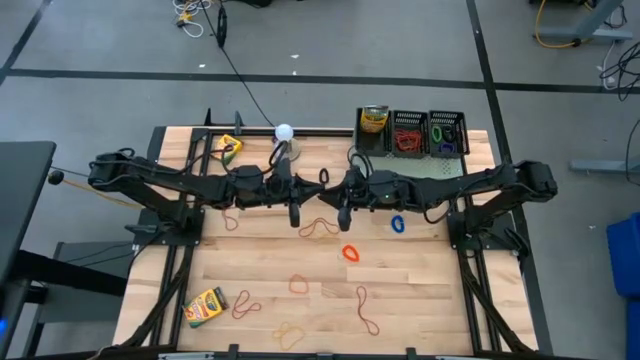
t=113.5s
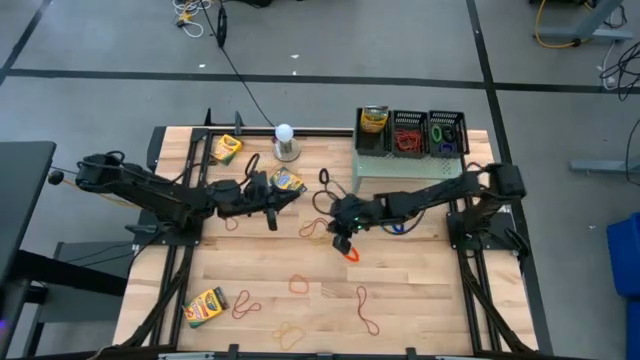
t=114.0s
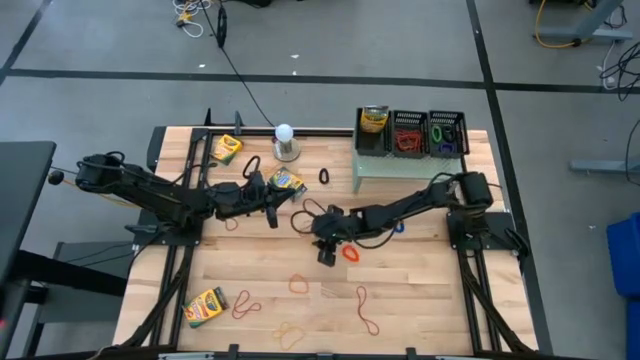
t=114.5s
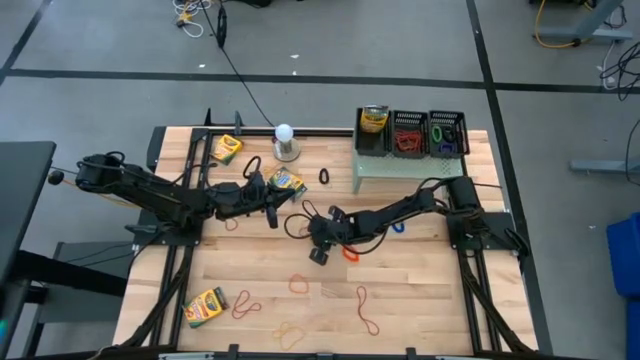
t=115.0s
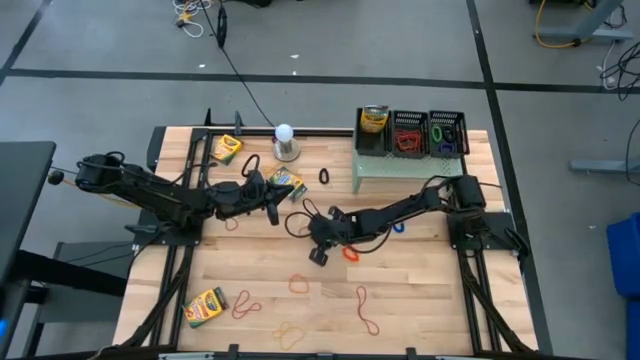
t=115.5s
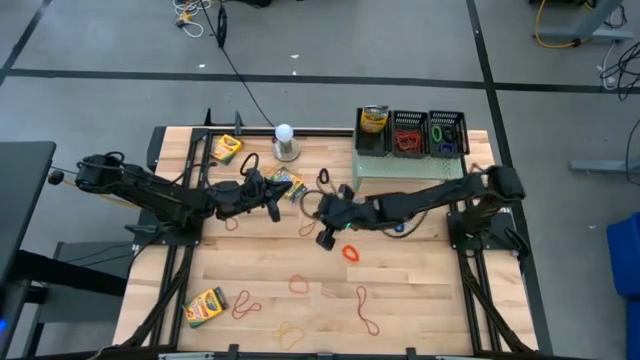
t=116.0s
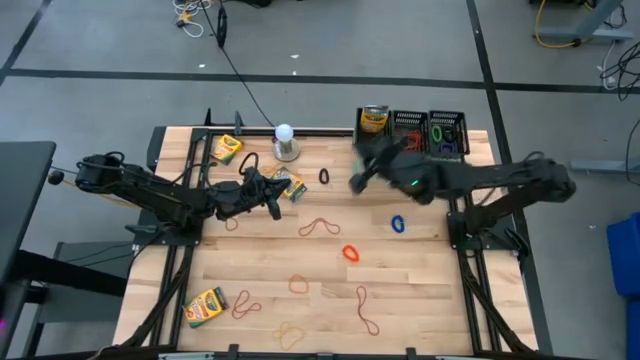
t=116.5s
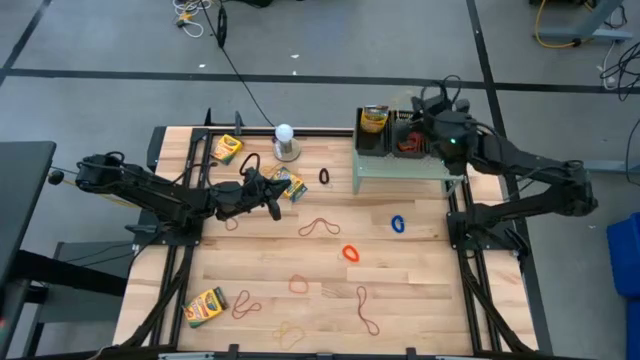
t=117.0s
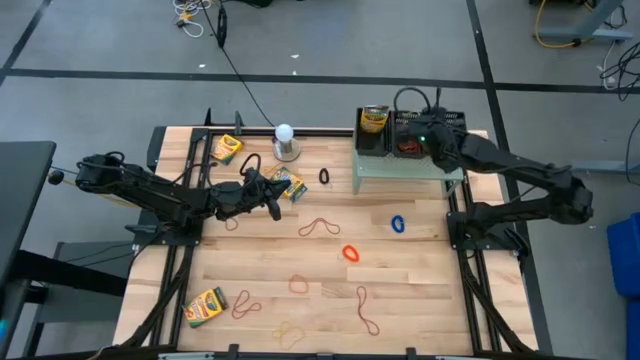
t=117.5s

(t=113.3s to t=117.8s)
Task: Pick & Place Office Desk Supplies
Put the middle yellow rubber band into the middle basket on the shelf

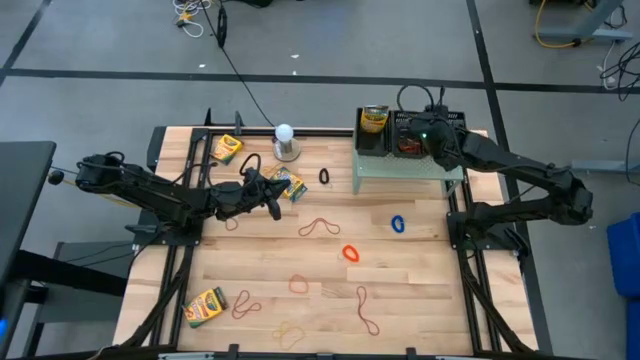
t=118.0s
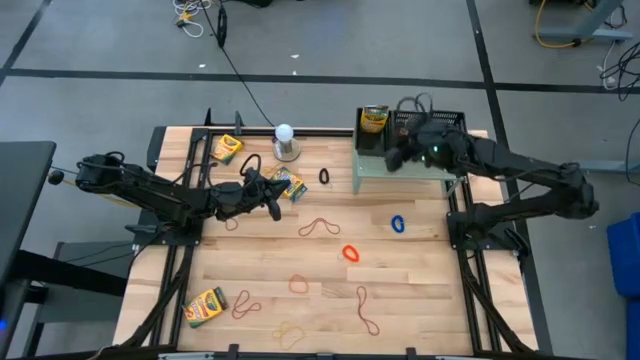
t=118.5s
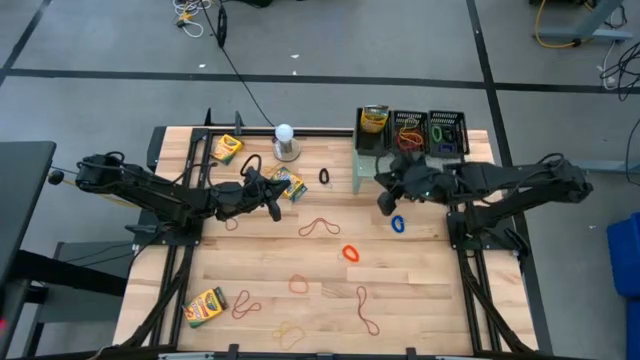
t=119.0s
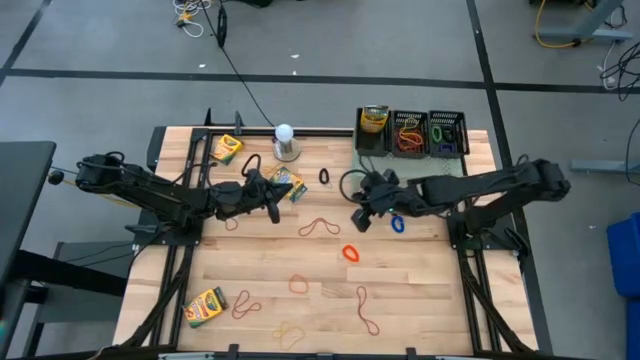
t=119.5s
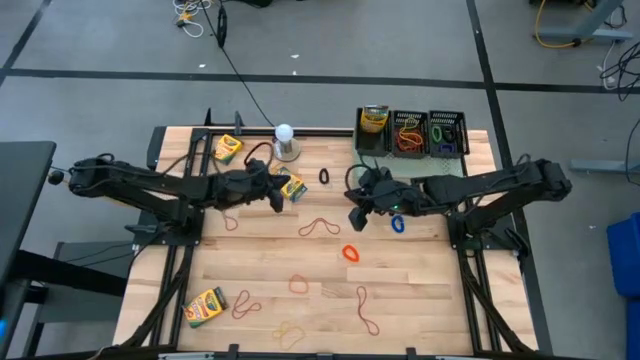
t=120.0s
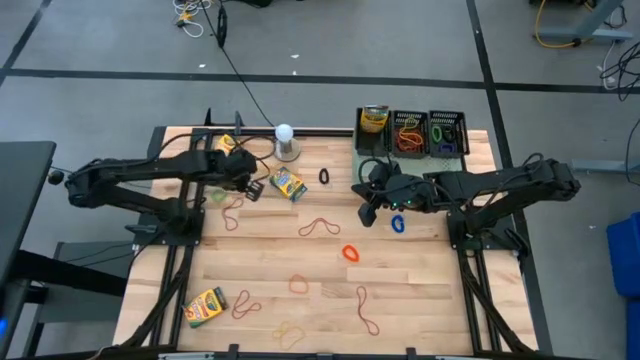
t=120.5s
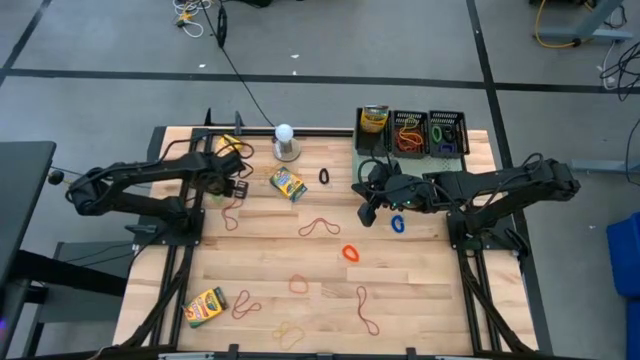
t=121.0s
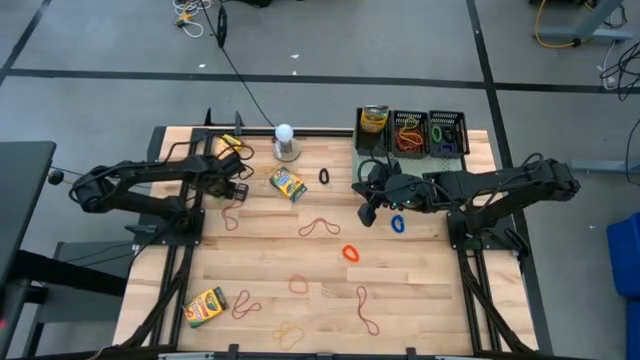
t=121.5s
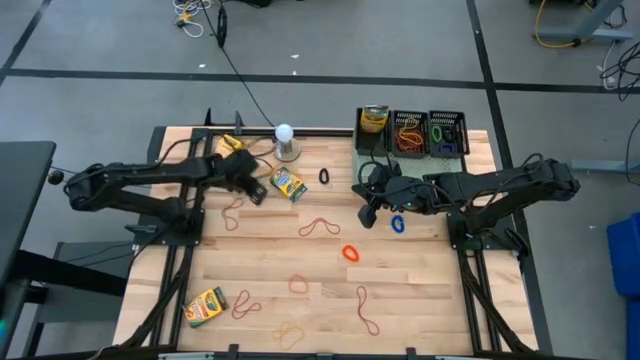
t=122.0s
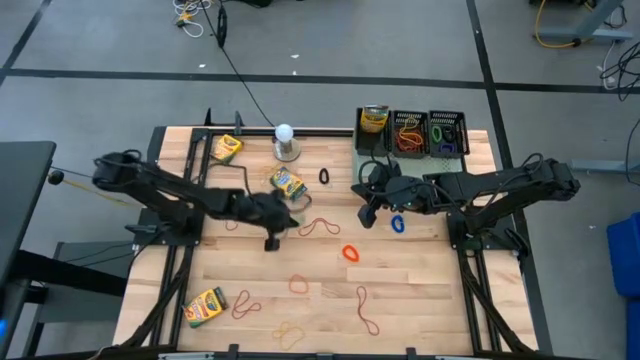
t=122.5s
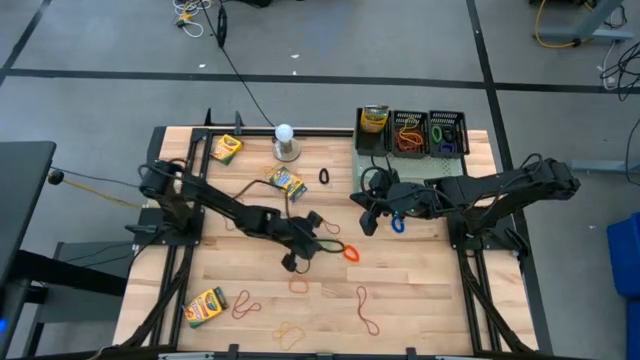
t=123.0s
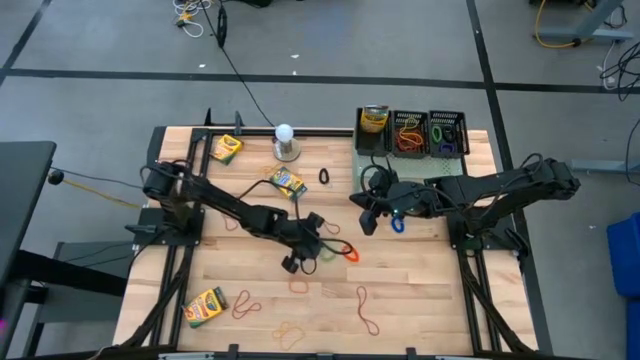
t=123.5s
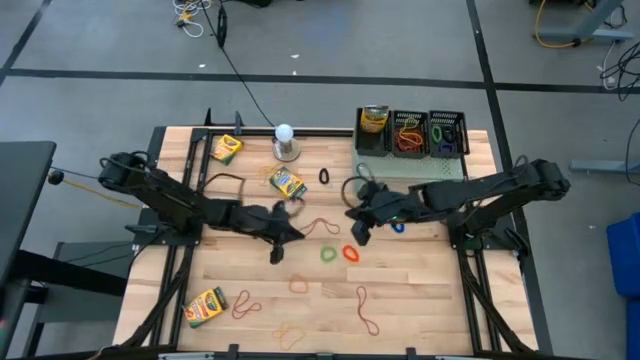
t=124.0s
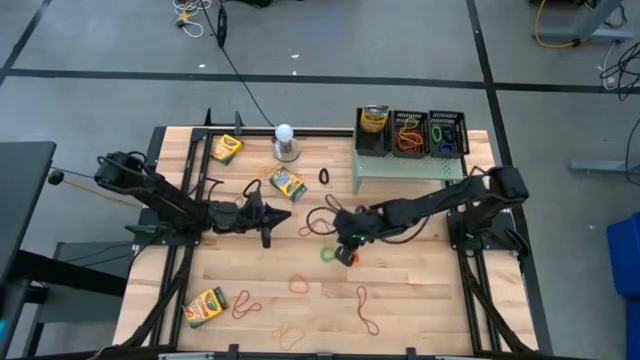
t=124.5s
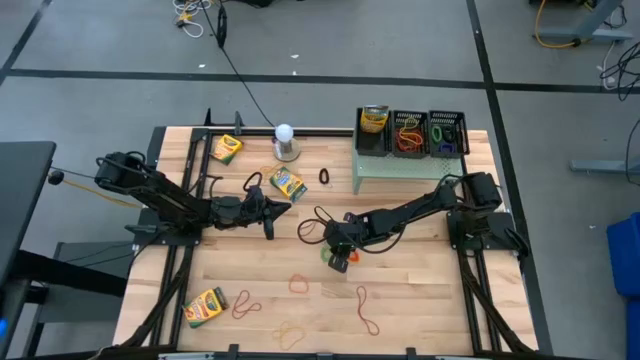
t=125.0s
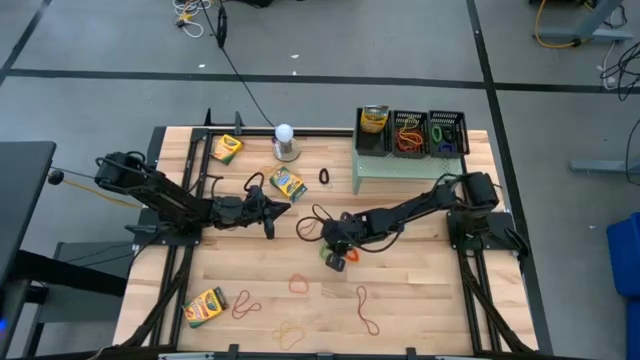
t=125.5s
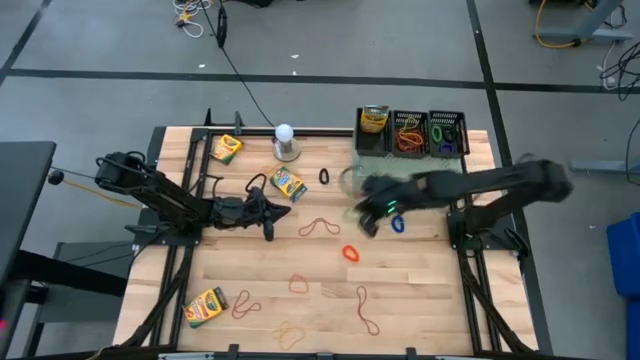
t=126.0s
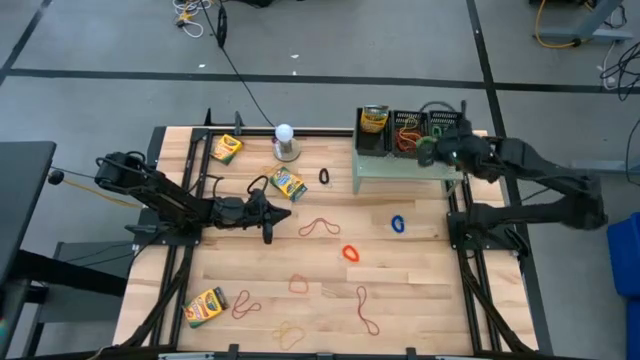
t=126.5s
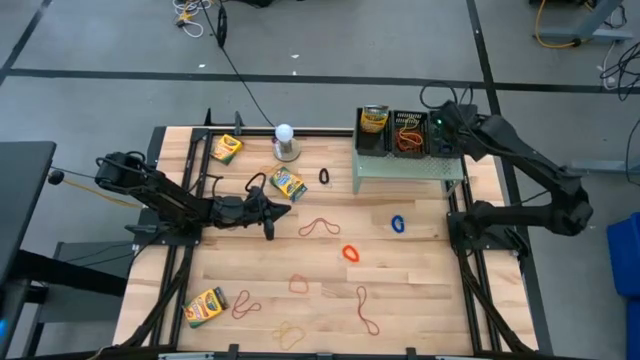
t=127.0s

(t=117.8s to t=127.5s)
Put the green spring keychain into the right basket on the shelf

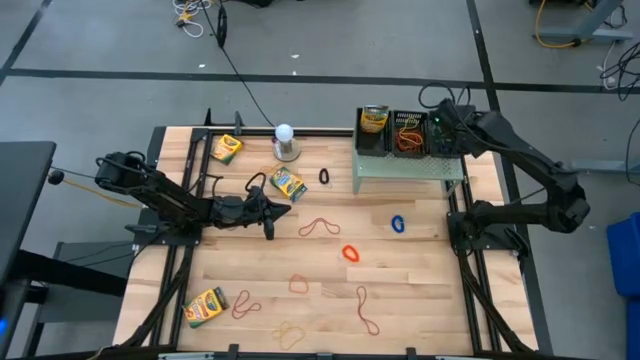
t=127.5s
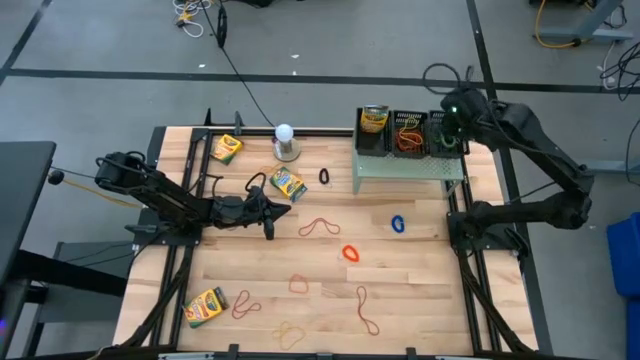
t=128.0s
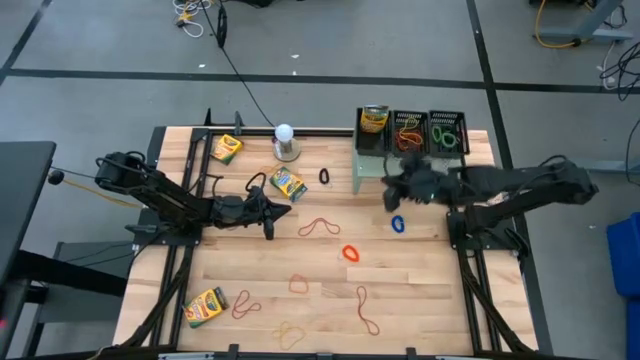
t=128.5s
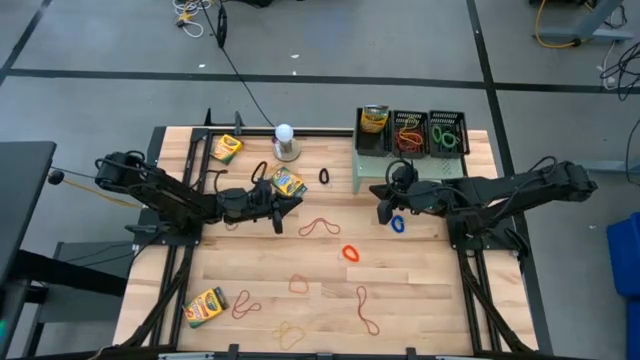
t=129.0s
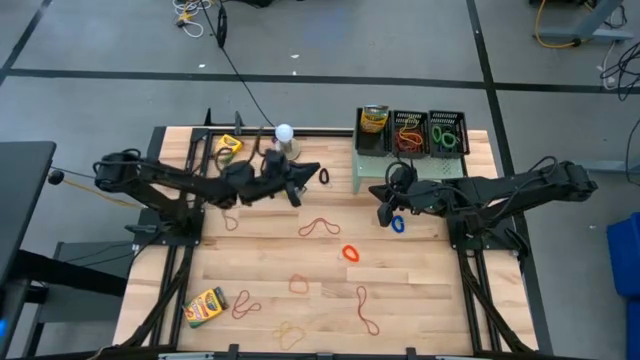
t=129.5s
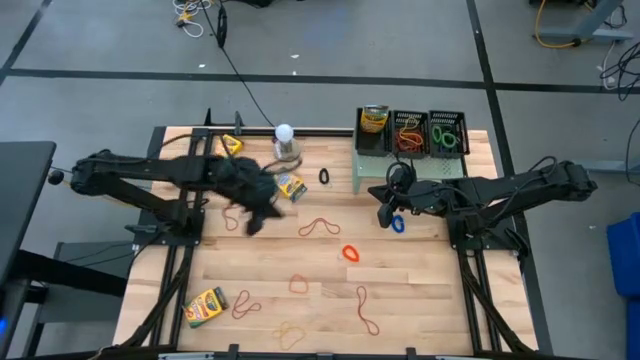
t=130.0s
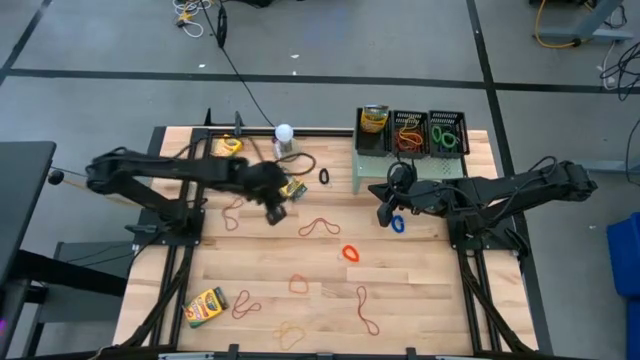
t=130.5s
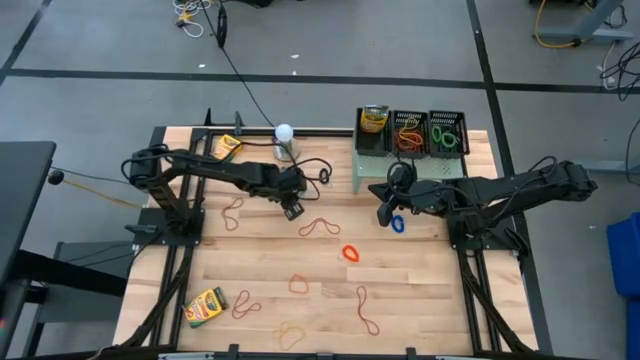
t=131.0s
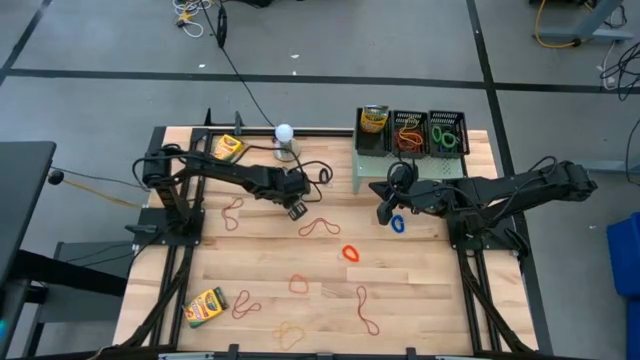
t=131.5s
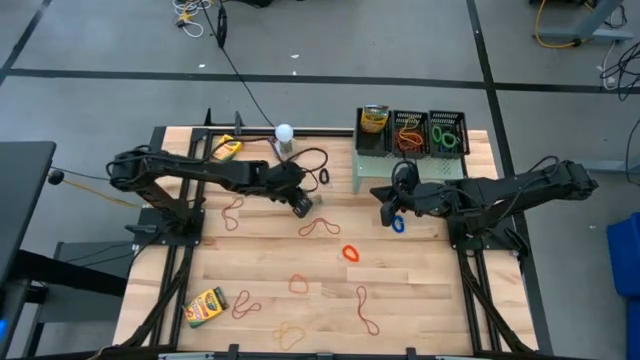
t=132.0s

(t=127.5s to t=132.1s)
Put the right crayon box into the left basket on the shelf

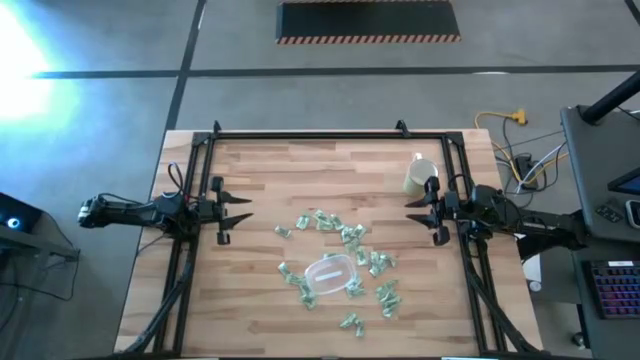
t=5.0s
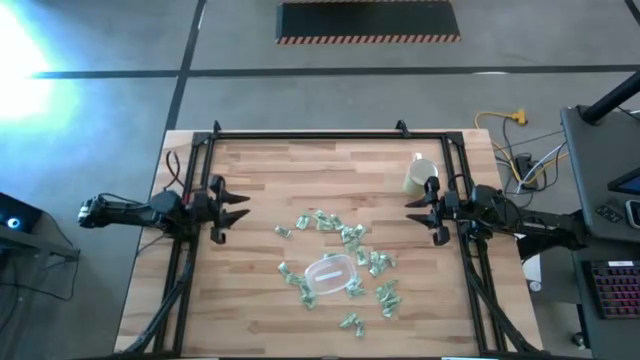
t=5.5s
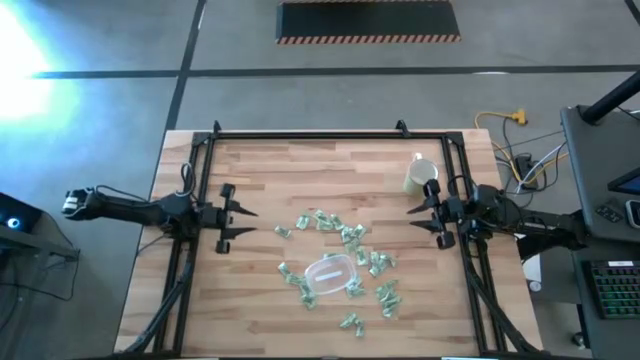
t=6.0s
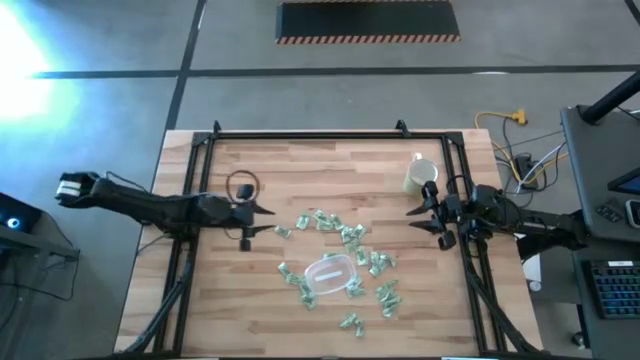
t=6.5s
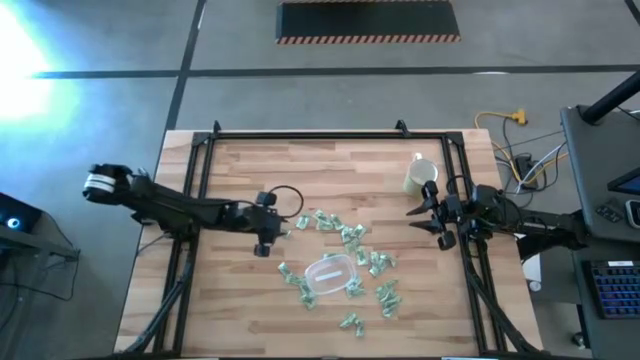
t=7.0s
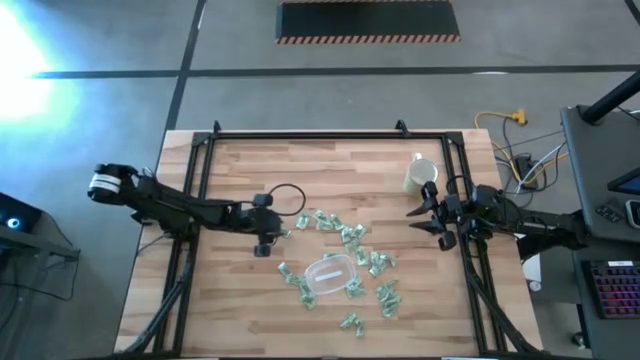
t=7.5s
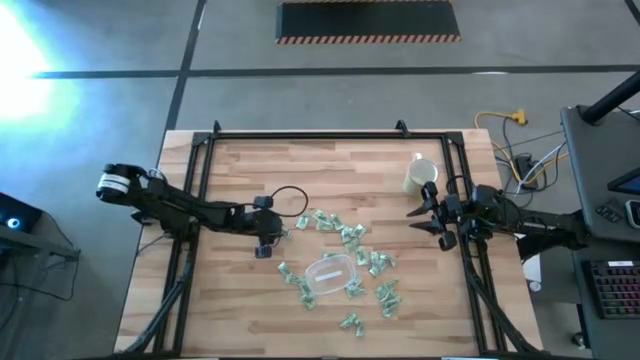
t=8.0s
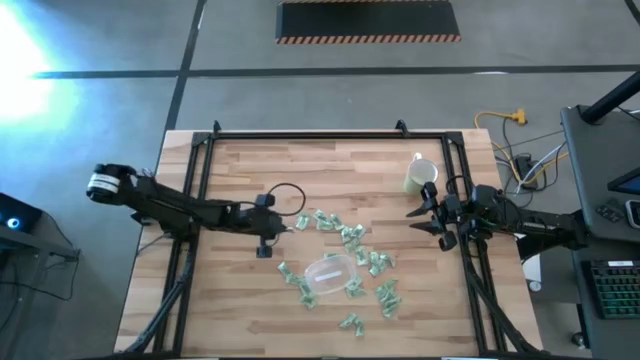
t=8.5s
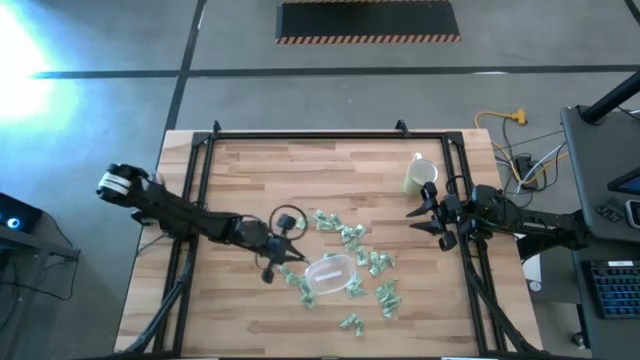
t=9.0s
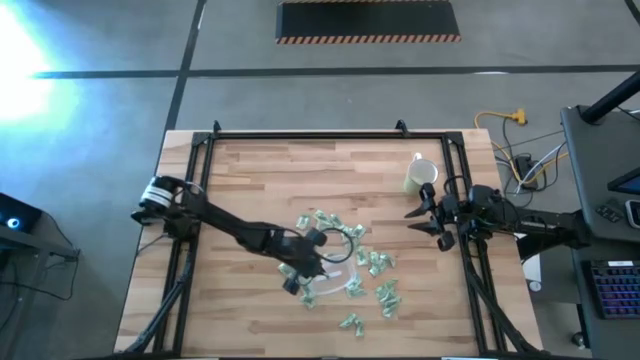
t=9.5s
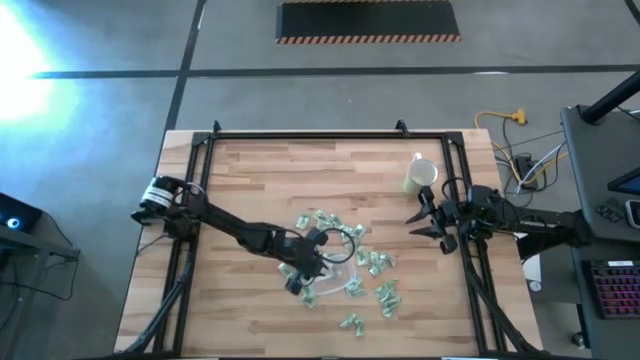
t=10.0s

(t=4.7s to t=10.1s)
Task: Pick and place items into bin
Put the Stevia packet into the transparent bin
